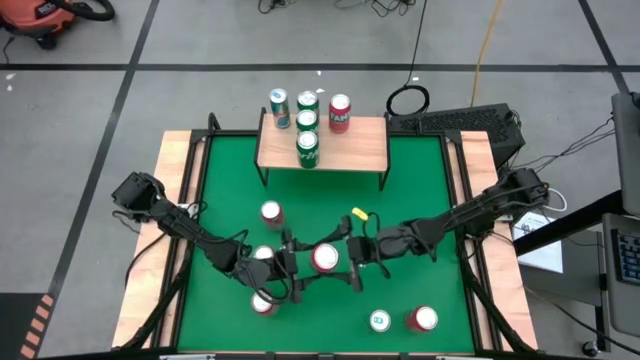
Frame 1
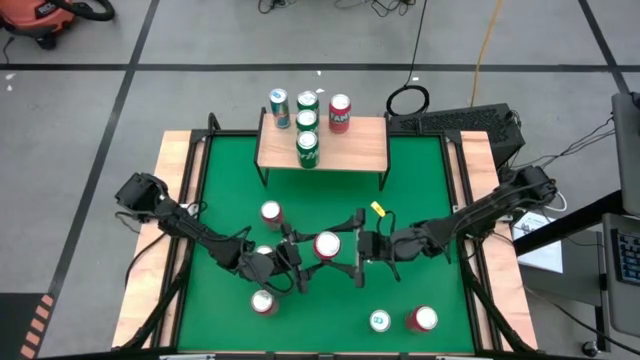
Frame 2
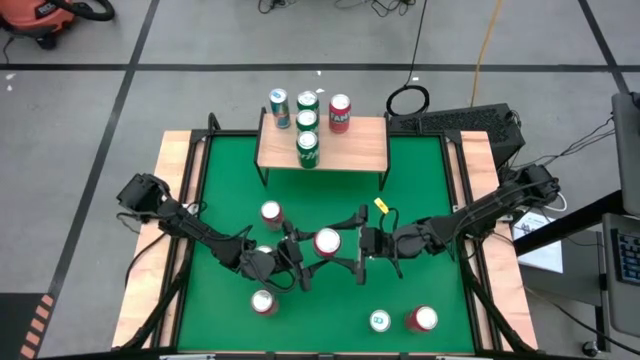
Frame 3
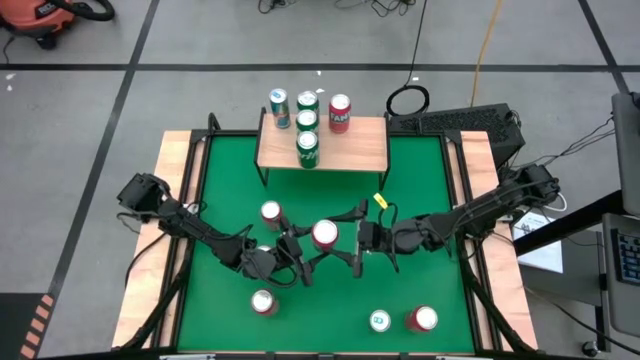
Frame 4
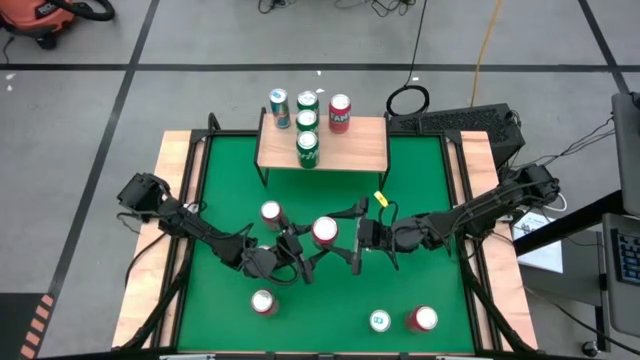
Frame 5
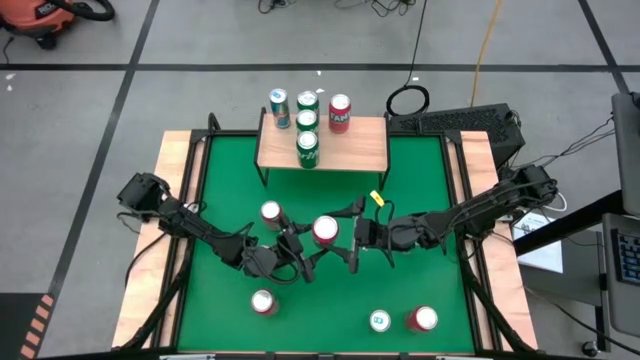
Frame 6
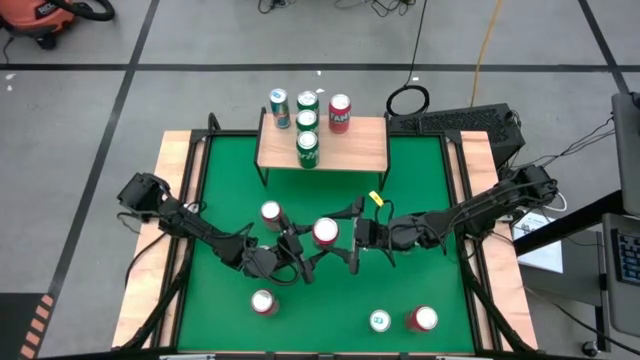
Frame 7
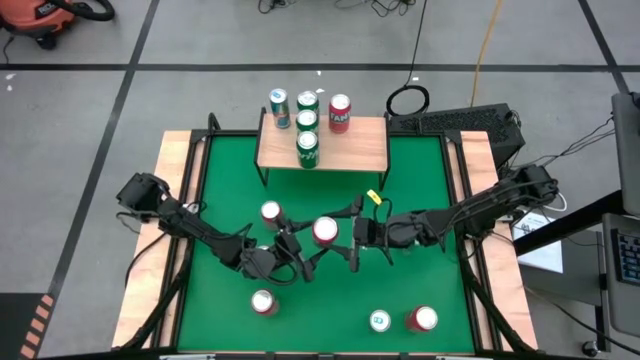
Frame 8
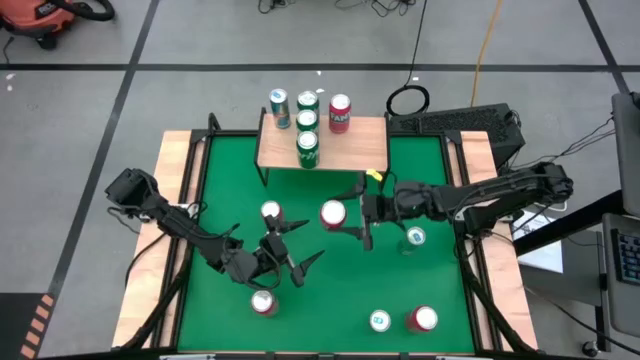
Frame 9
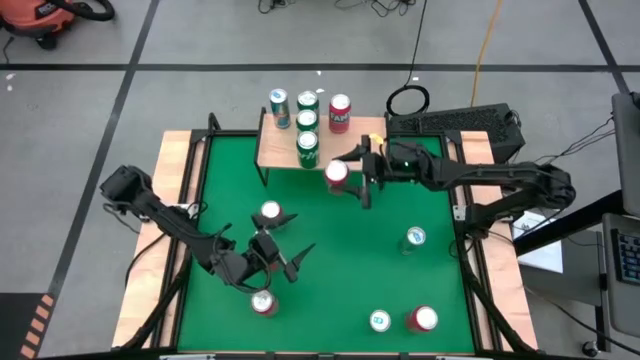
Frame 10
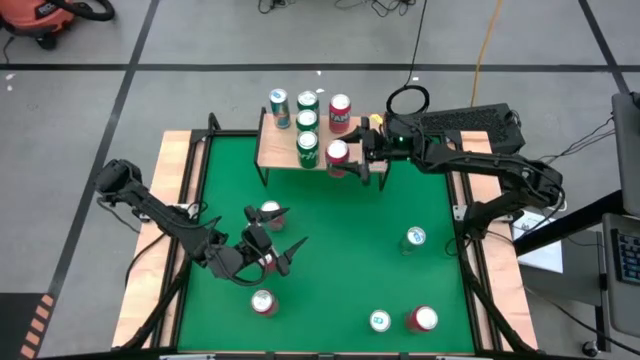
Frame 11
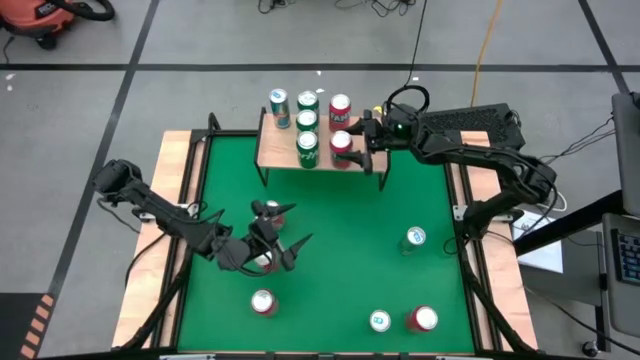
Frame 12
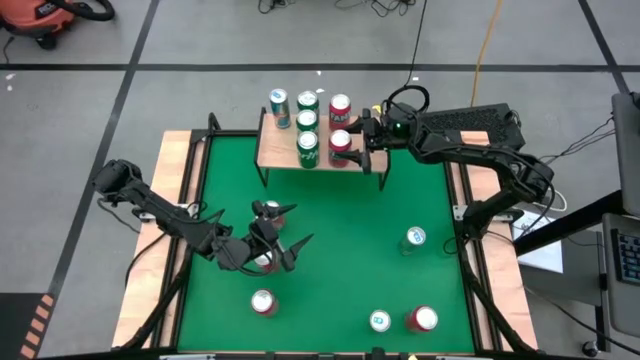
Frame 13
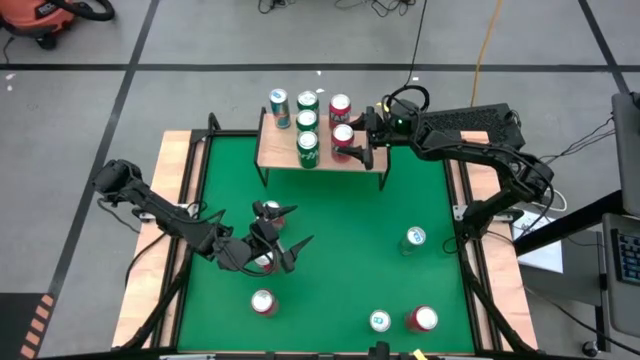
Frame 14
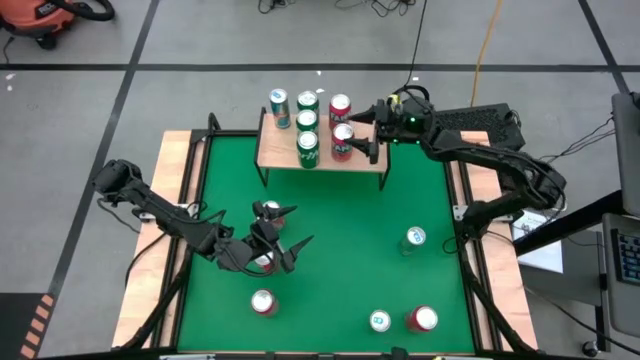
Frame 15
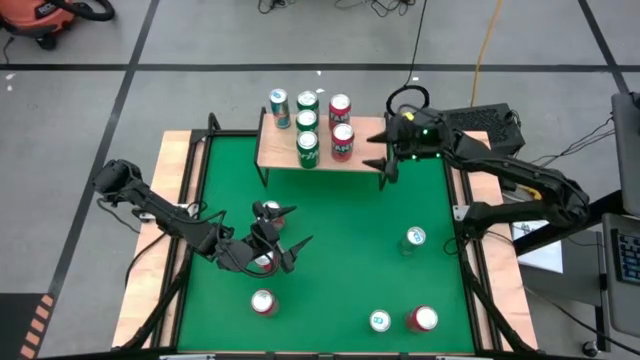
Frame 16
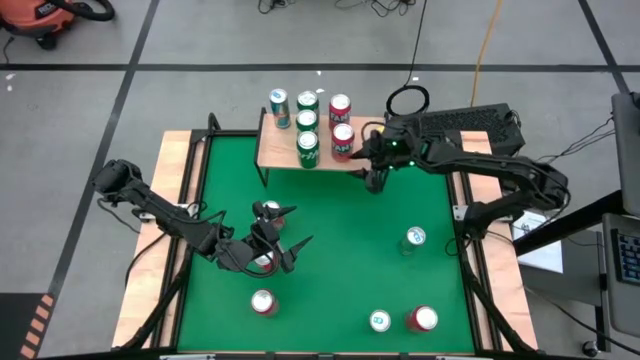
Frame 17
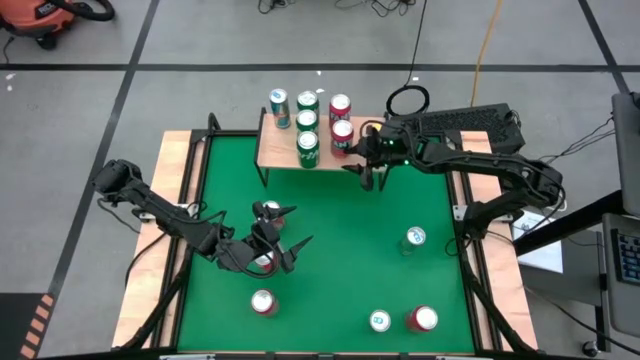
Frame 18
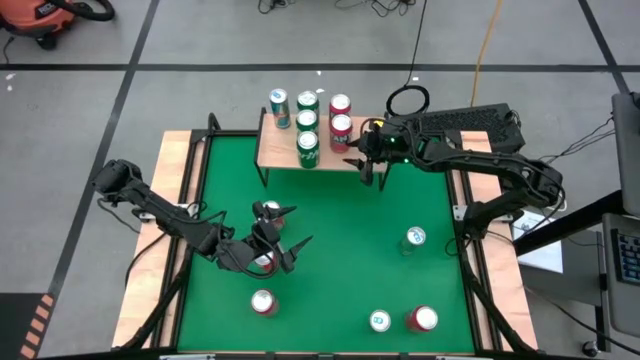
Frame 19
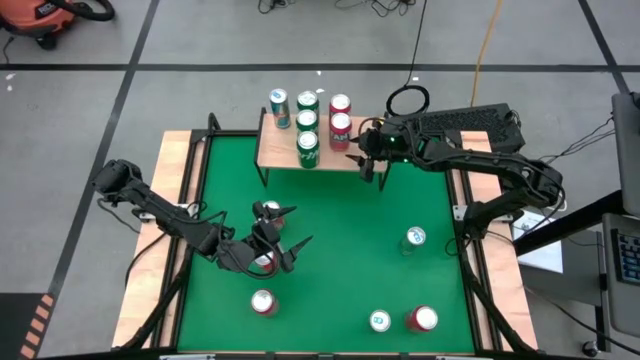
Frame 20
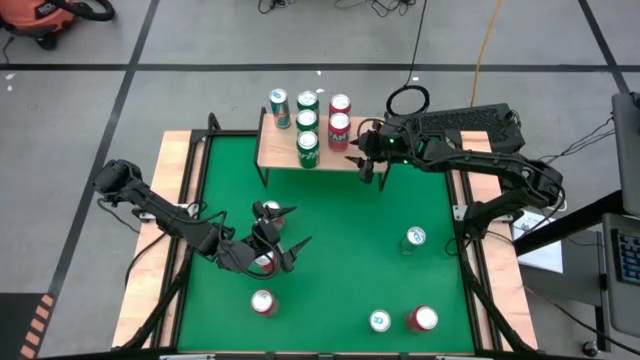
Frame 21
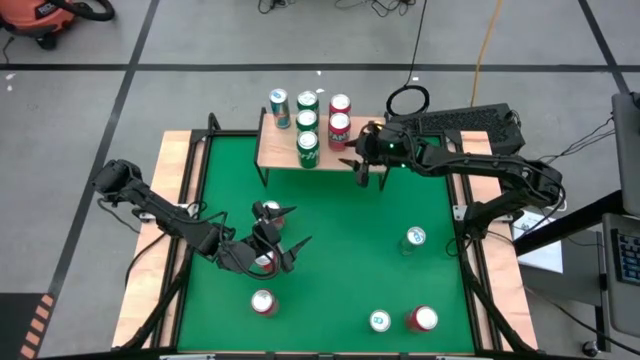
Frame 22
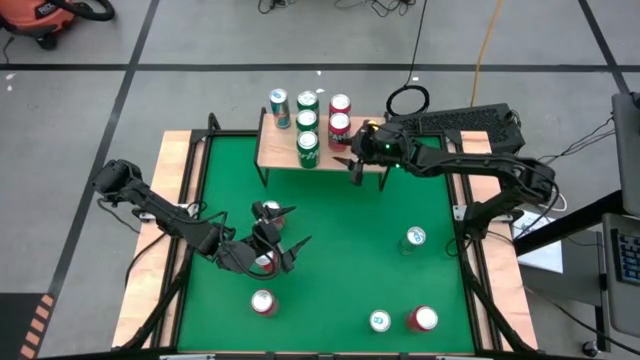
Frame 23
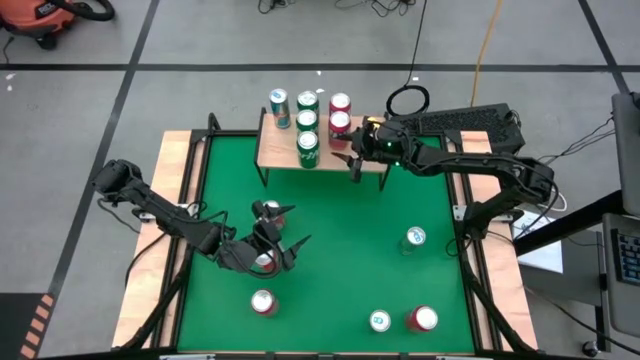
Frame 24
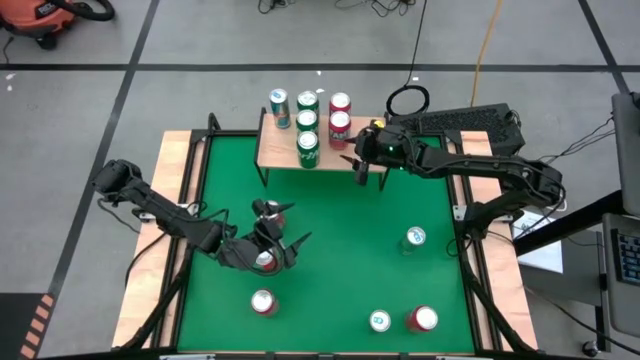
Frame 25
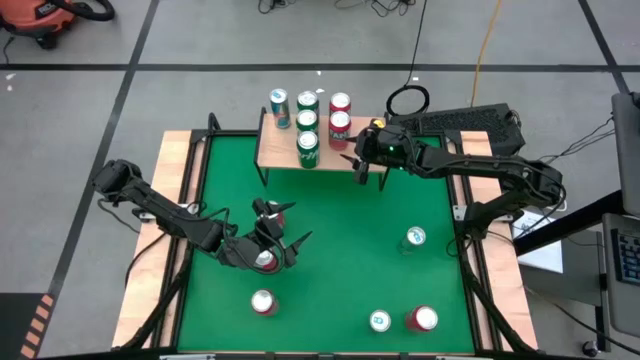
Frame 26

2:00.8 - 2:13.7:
Task: Place canned beverage on shelf
Put the orange soda can on the shelf aligned with the other orange soda can

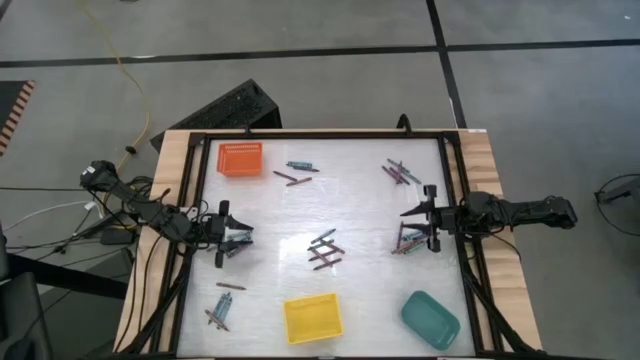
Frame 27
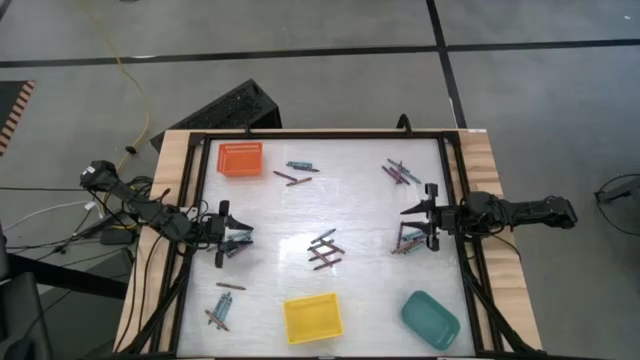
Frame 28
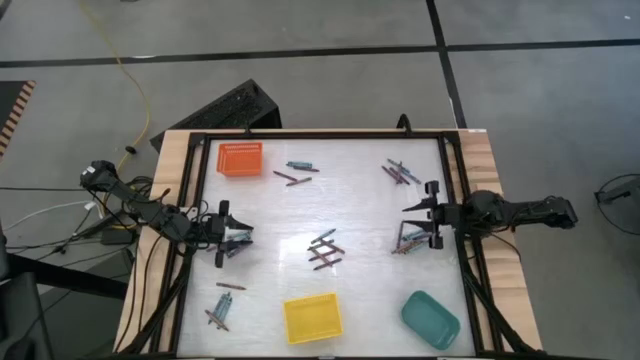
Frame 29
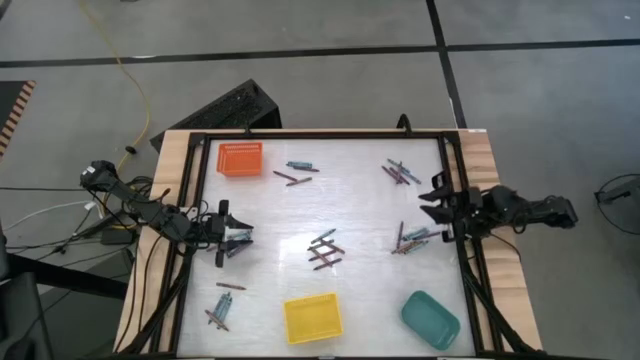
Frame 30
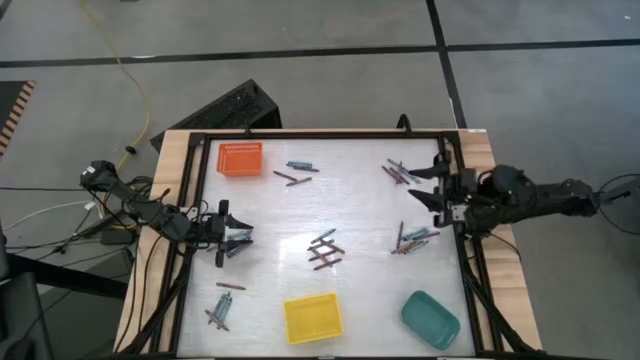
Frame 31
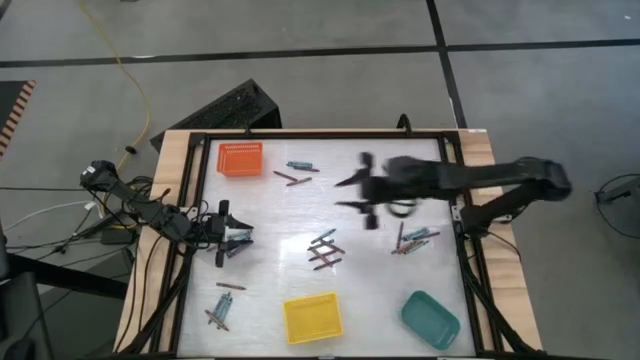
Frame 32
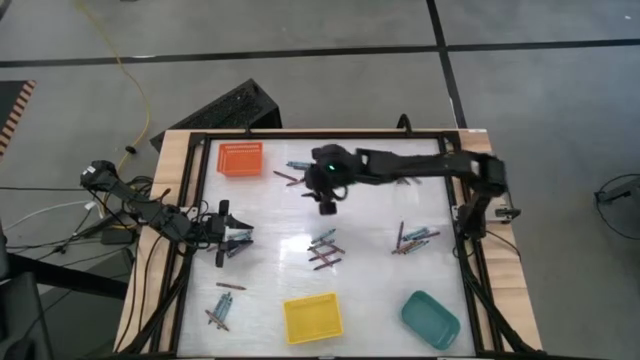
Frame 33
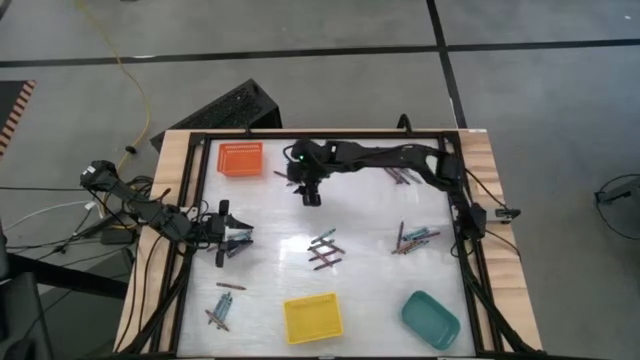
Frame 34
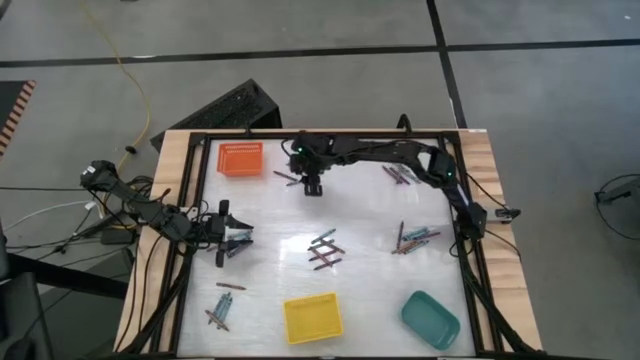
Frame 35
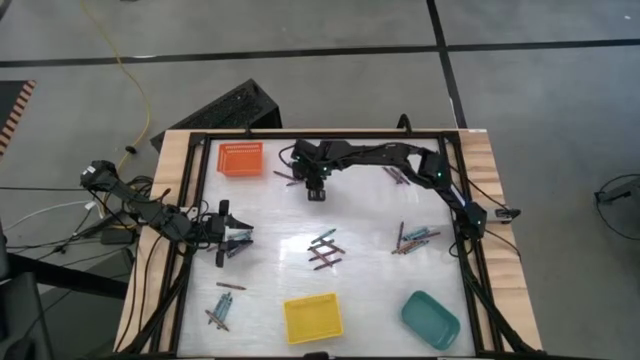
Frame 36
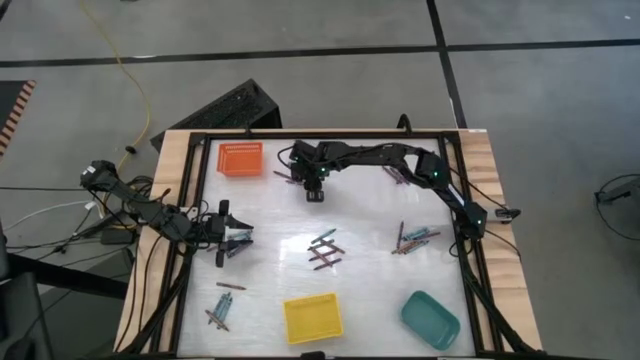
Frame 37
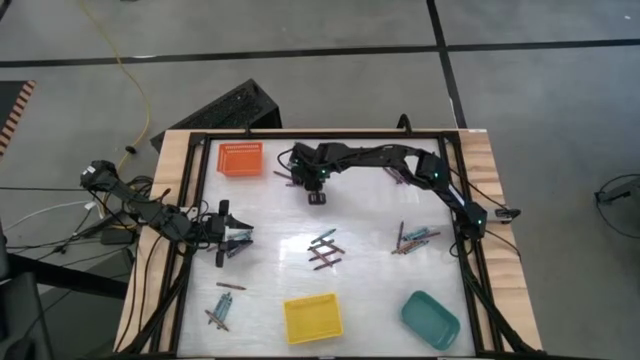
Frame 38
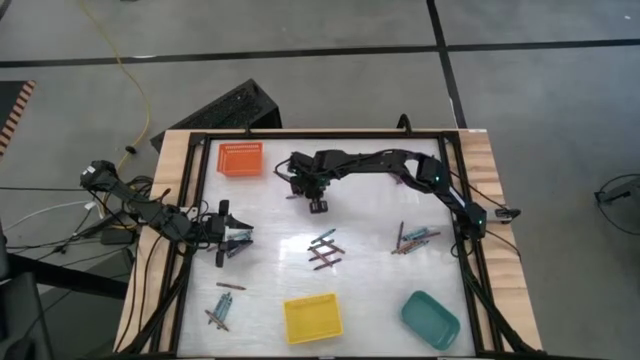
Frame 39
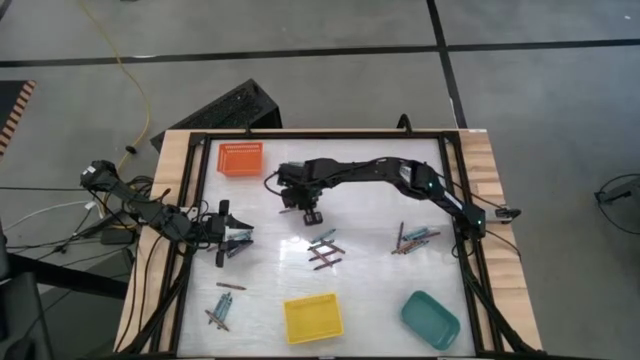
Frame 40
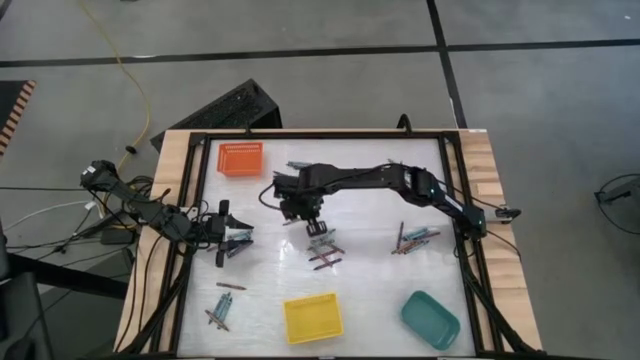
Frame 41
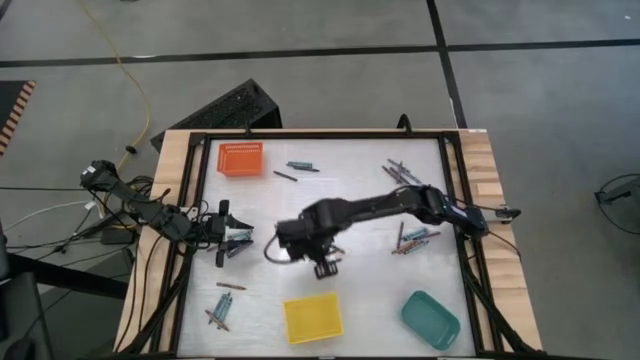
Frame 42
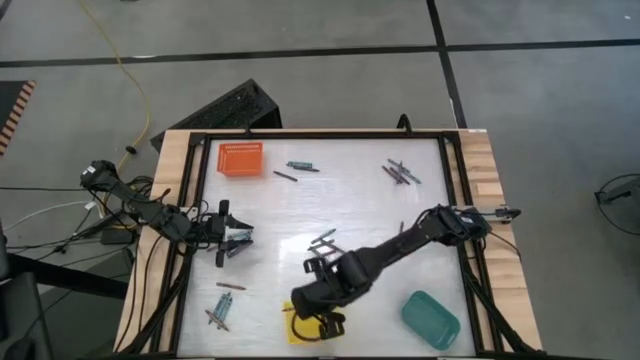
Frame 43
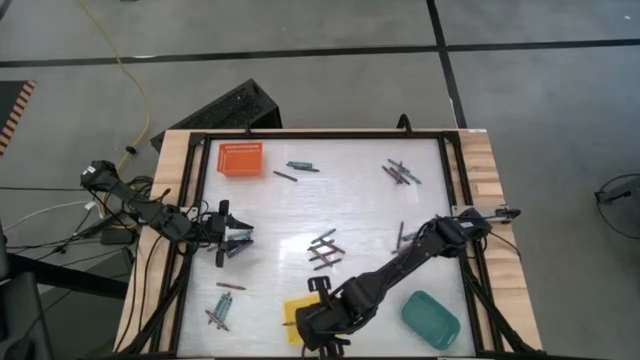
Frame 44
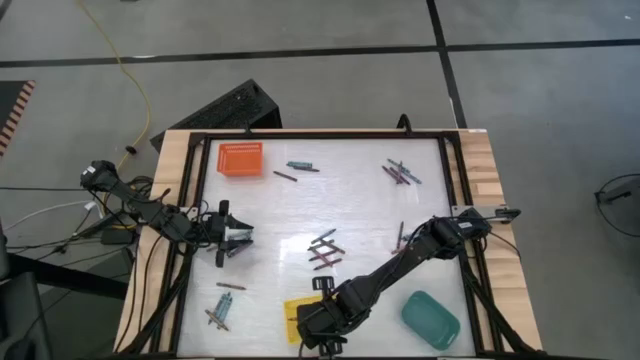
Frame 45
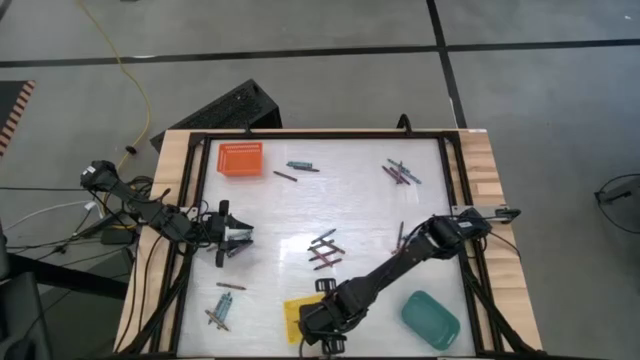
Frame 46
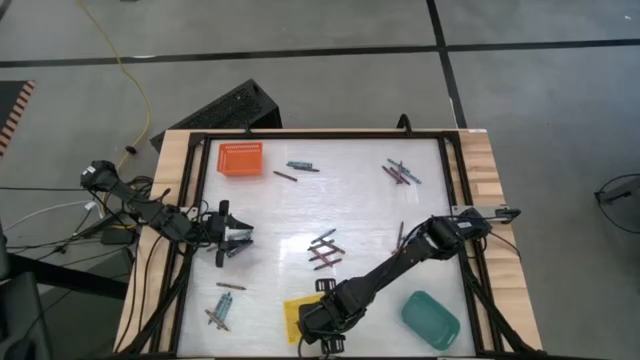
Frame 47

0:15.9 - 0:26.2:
Task: Sort crayons
Put the brown crayon into the yellow bin
